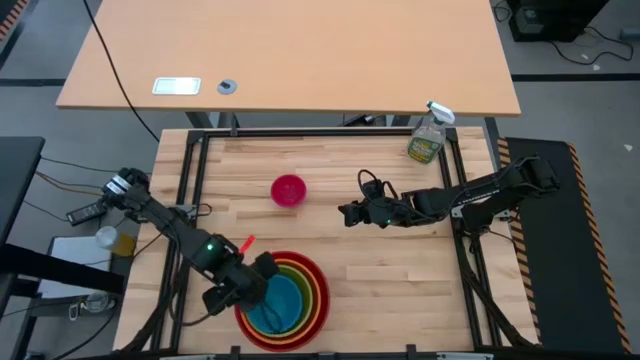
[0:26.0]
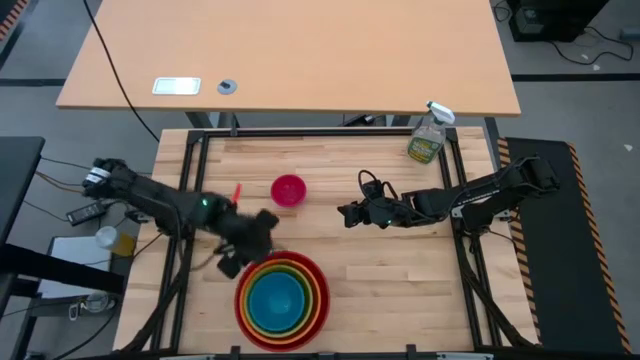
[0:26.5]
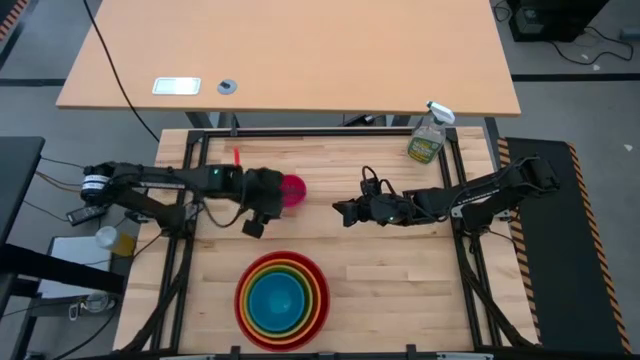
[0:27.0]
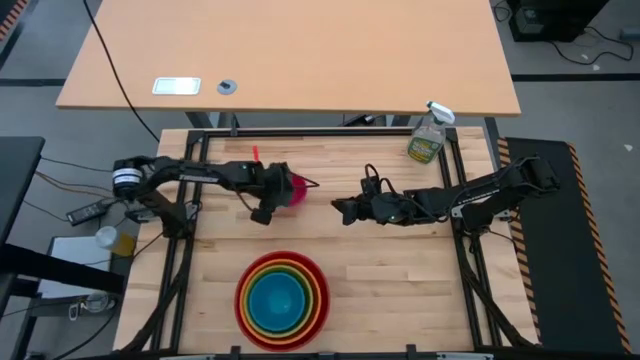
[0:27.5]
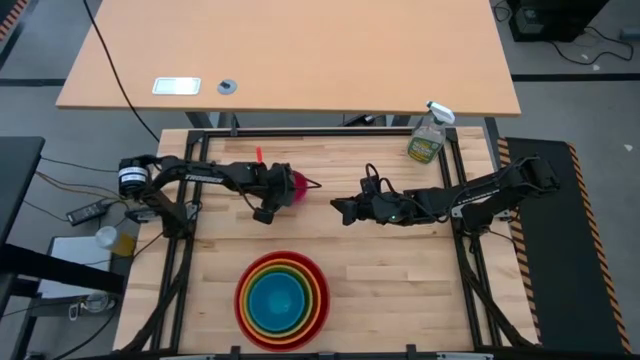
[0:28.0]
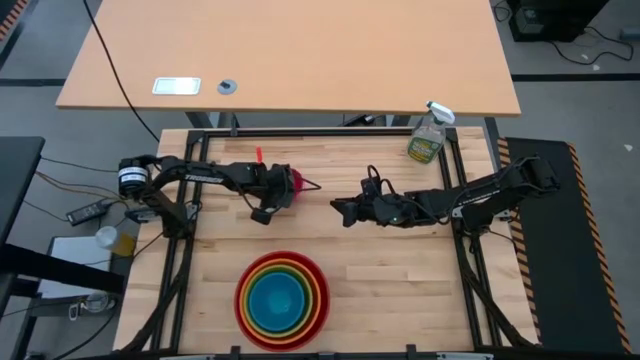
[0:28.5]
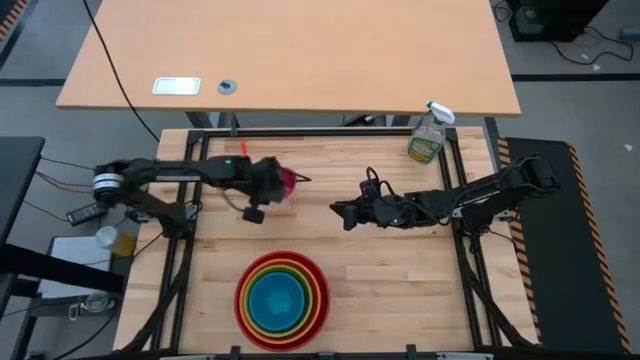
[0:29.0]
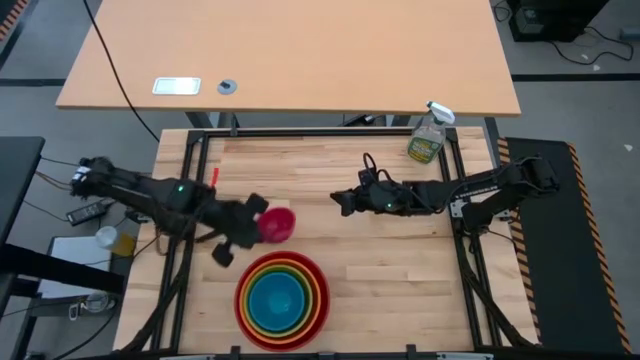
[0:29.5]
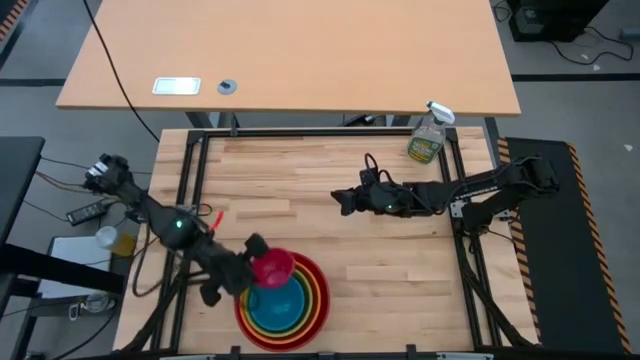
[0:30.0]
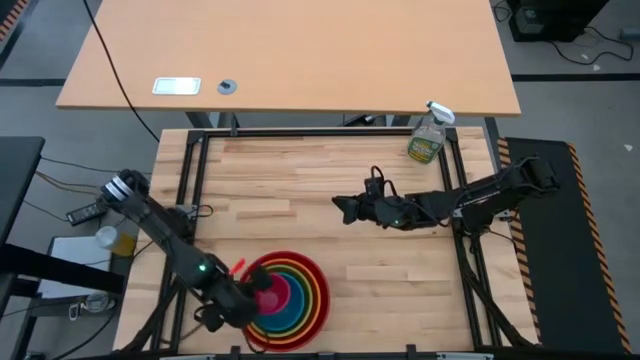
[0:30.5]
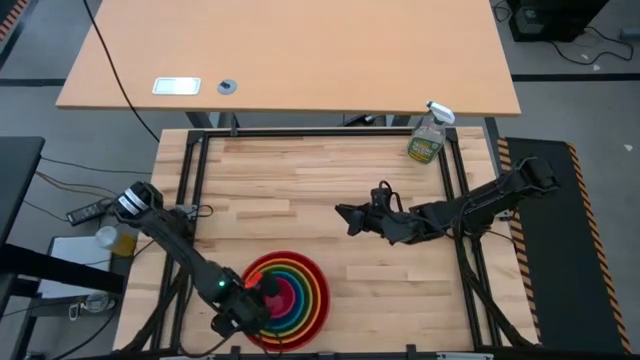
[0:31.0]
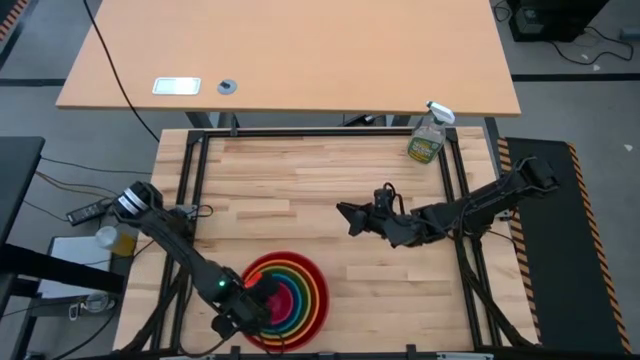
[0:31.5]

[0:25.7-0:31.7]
Stack the pink bowl on top of the blue bowl

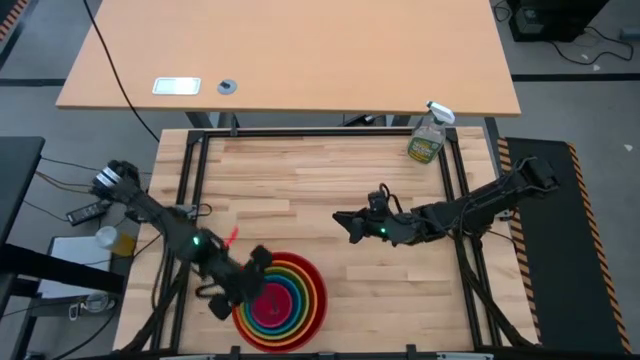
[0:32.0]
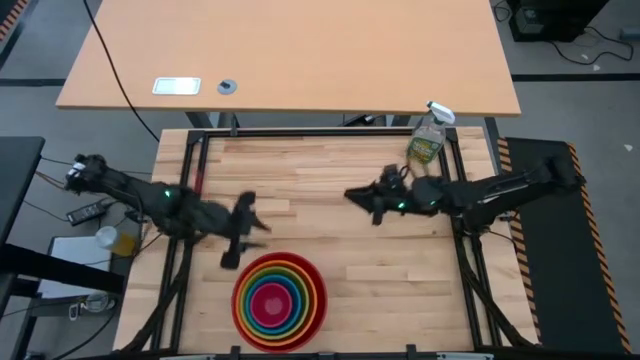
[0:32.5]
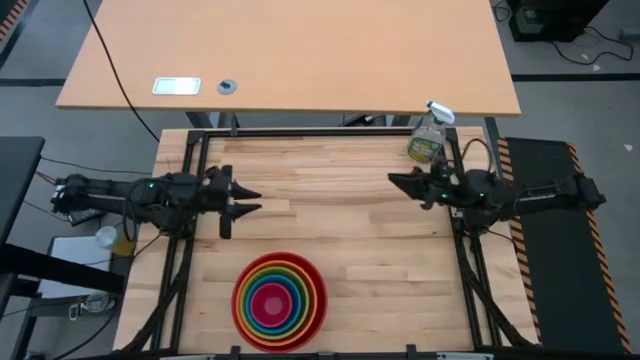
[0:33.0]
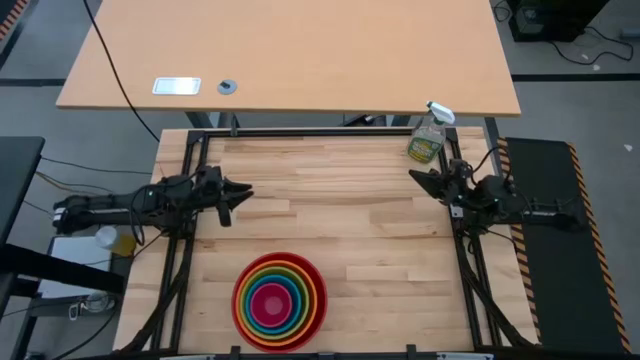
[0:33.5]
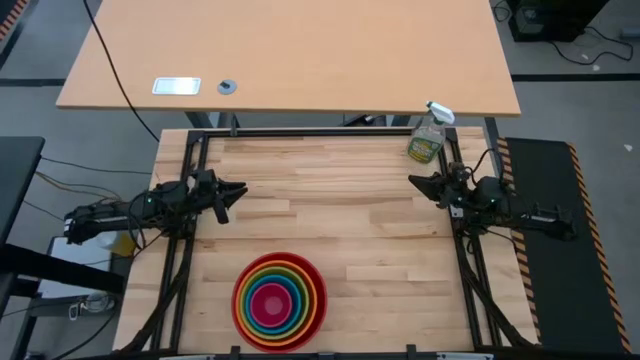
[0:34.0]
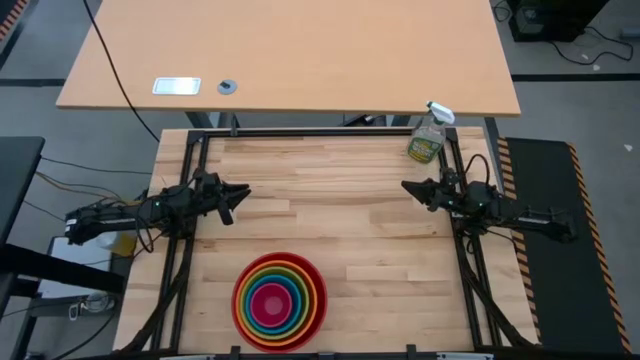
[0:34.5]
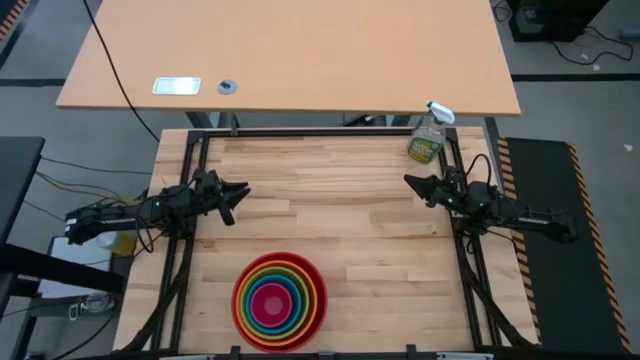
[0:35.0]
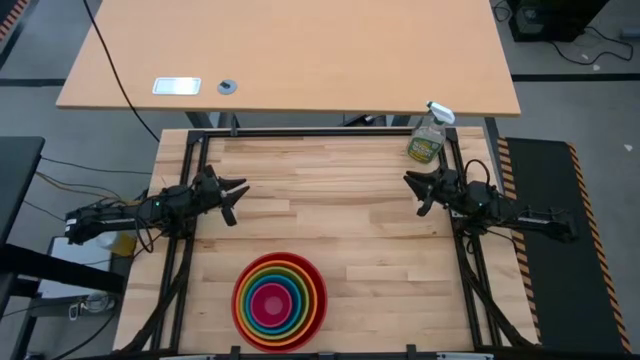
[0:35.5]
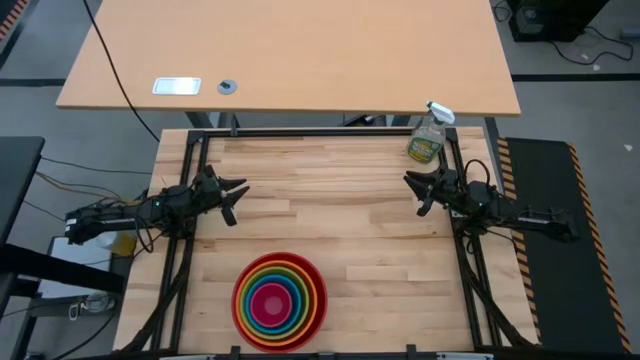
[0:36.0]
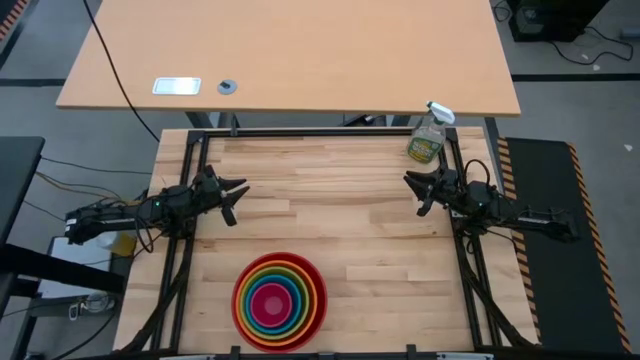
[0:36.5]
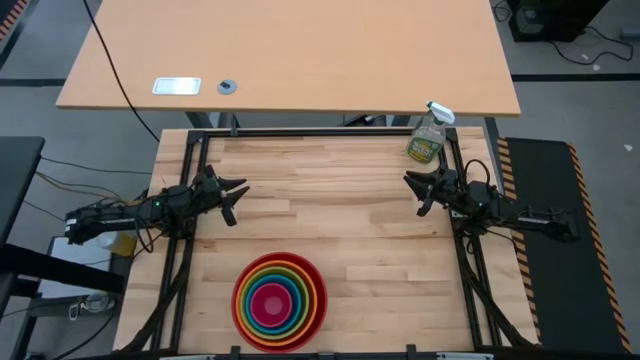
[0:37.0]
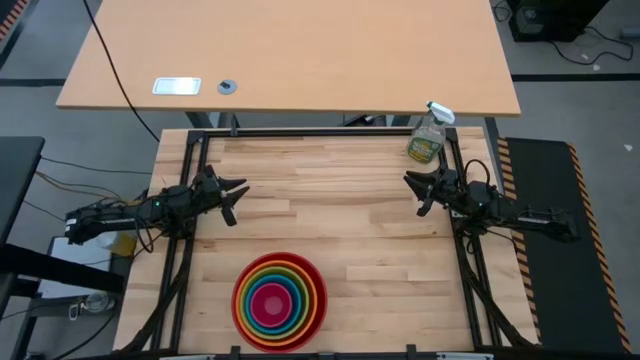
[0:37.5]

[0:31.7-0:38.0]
Return to Home Position
